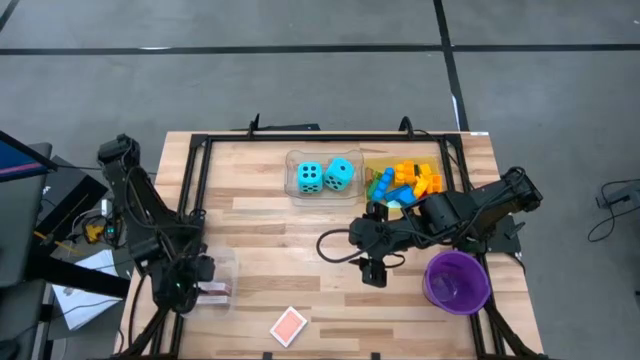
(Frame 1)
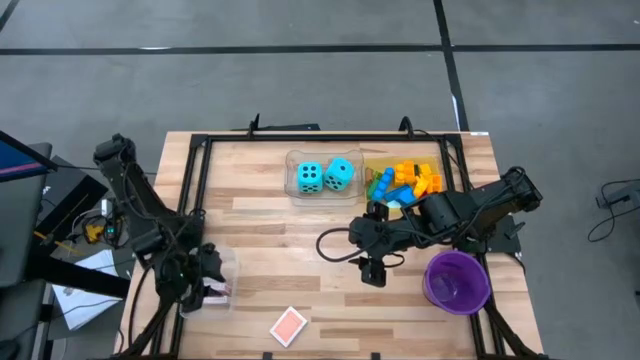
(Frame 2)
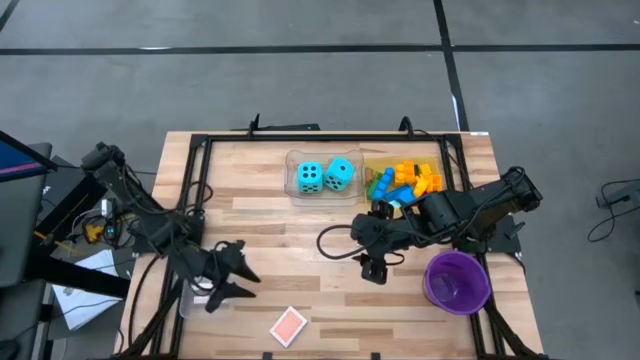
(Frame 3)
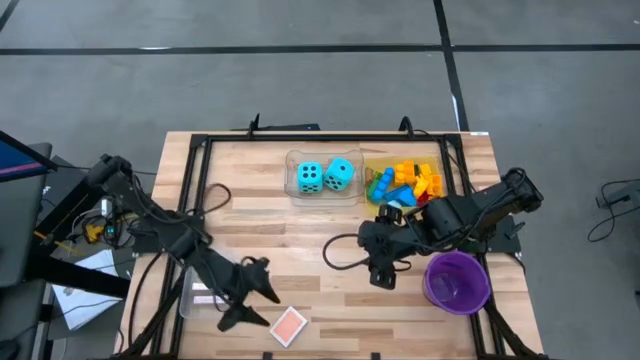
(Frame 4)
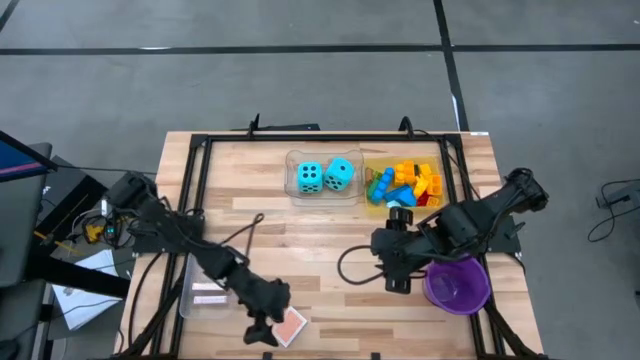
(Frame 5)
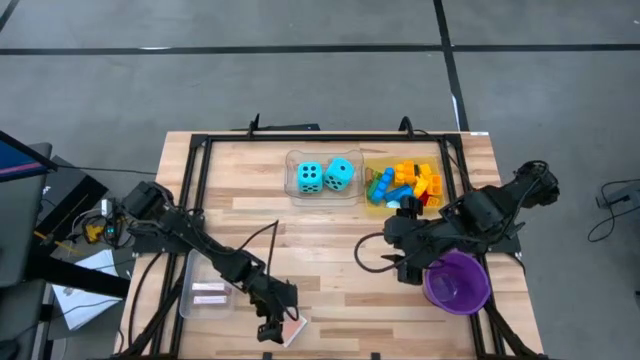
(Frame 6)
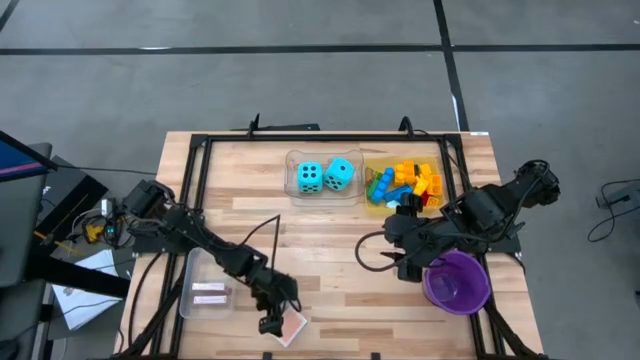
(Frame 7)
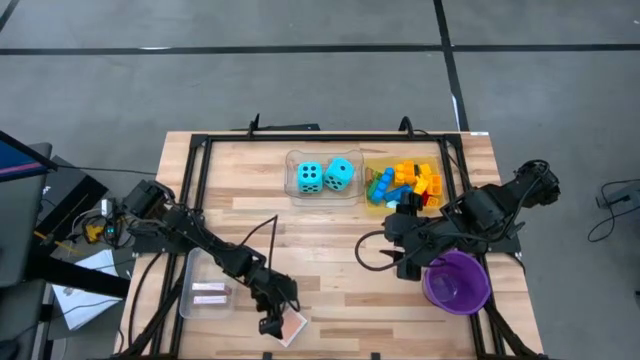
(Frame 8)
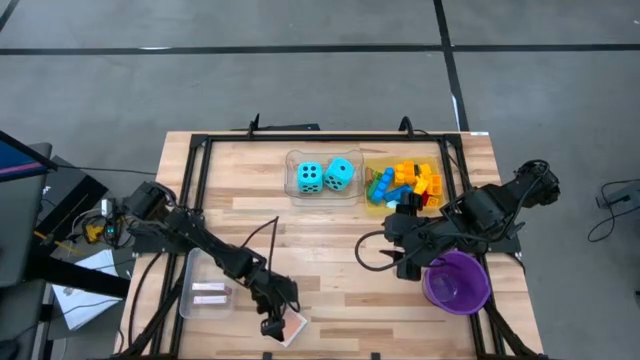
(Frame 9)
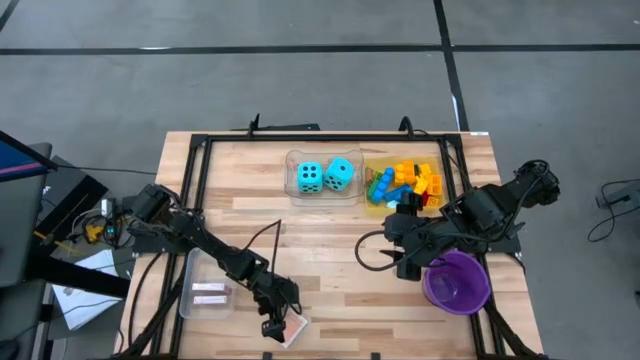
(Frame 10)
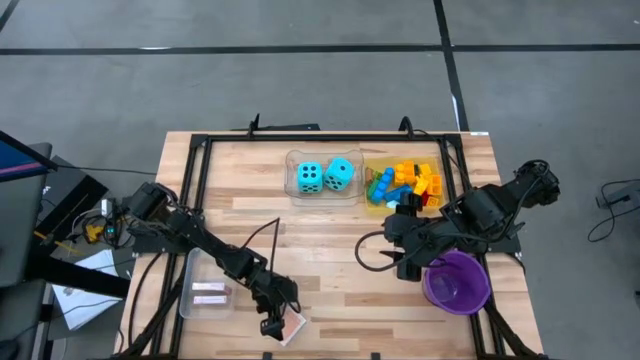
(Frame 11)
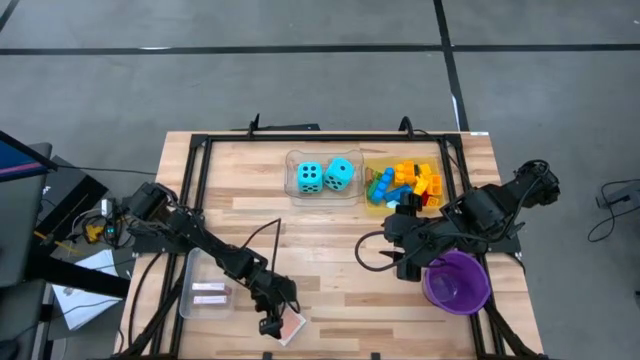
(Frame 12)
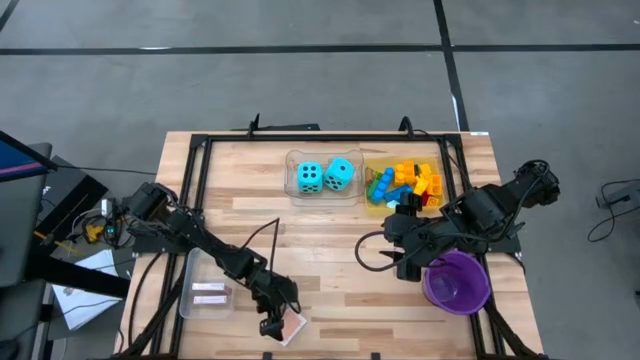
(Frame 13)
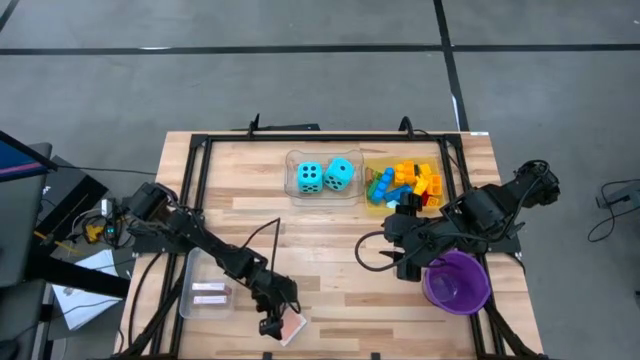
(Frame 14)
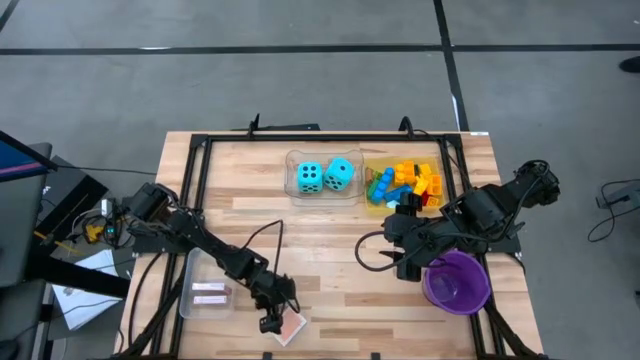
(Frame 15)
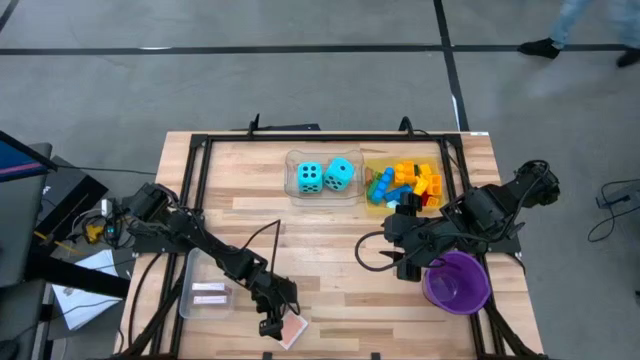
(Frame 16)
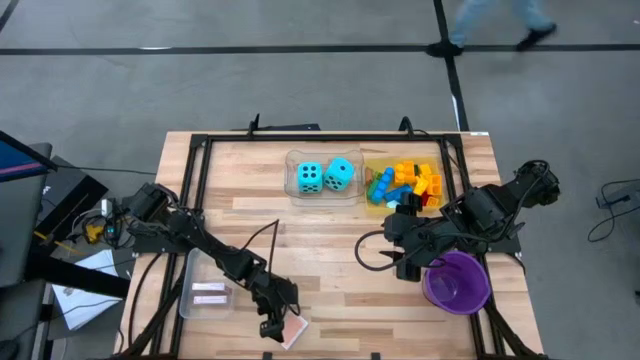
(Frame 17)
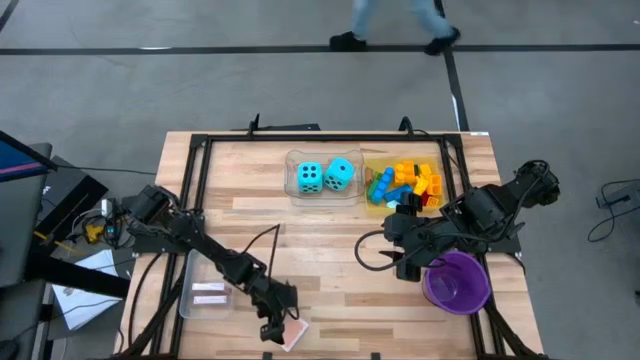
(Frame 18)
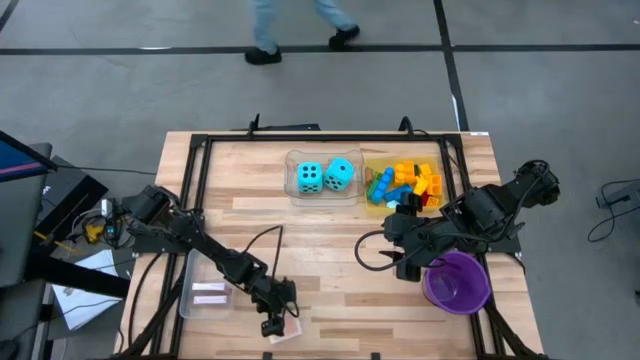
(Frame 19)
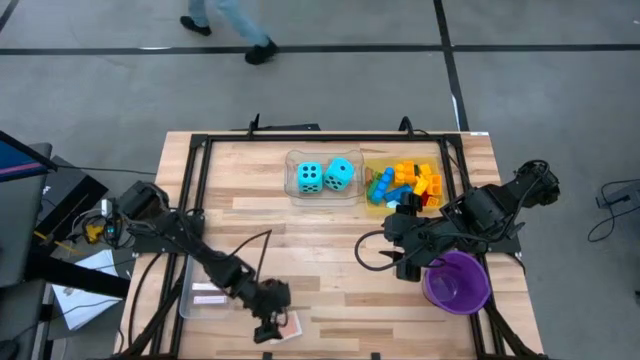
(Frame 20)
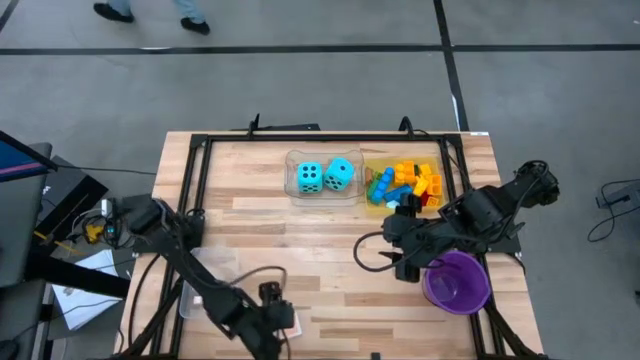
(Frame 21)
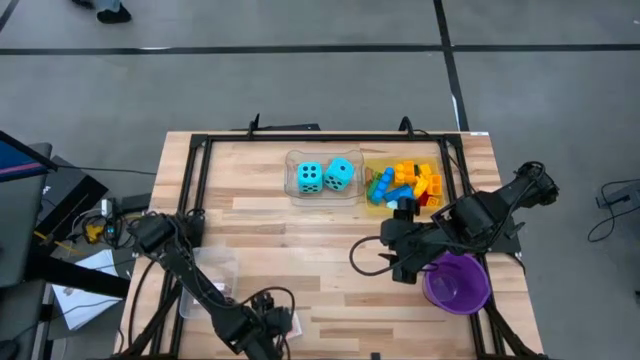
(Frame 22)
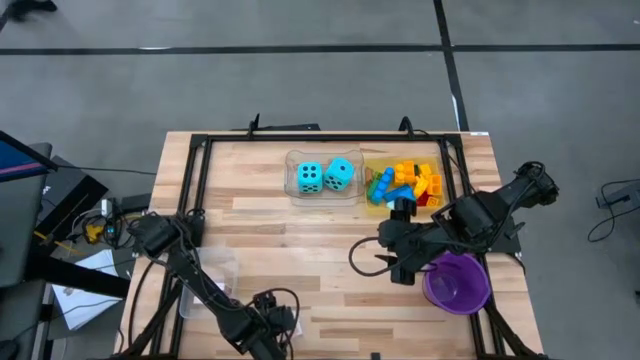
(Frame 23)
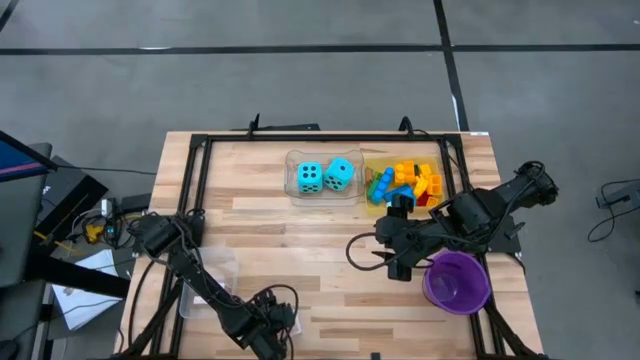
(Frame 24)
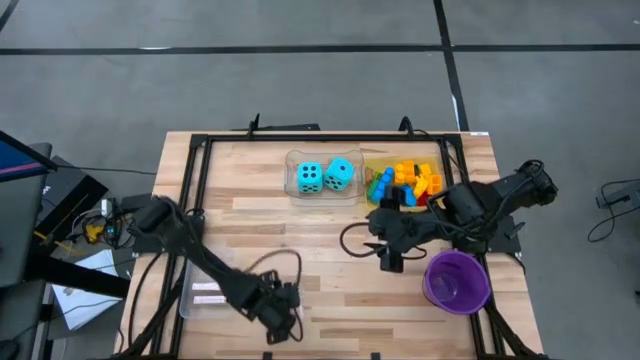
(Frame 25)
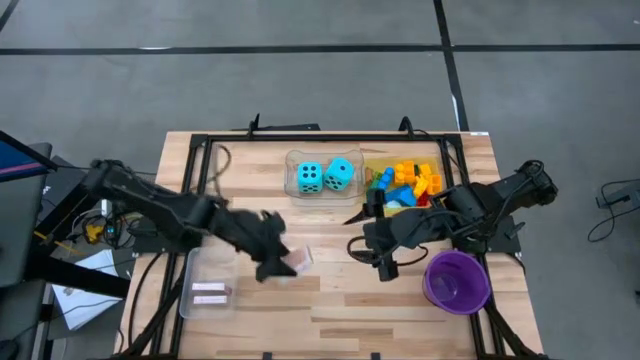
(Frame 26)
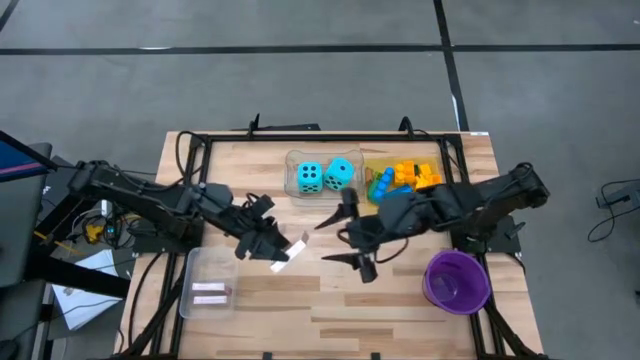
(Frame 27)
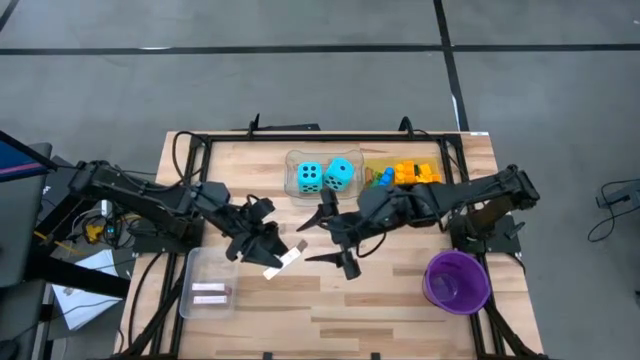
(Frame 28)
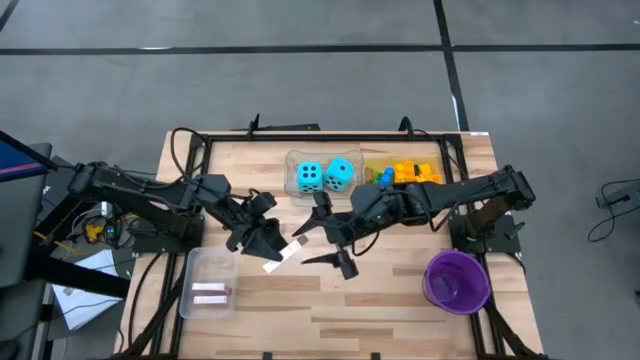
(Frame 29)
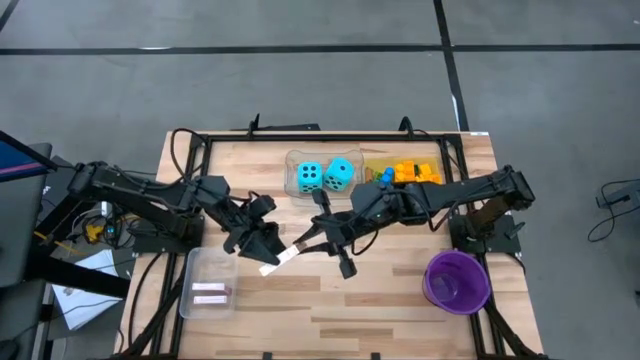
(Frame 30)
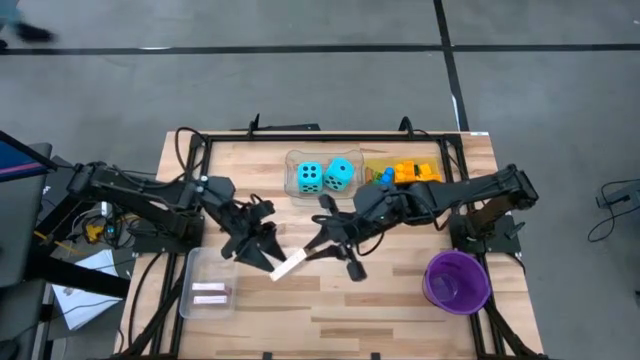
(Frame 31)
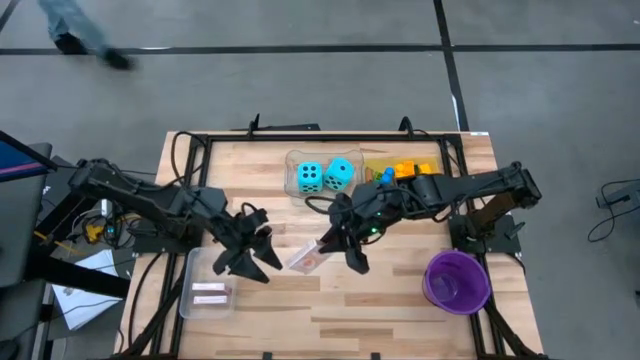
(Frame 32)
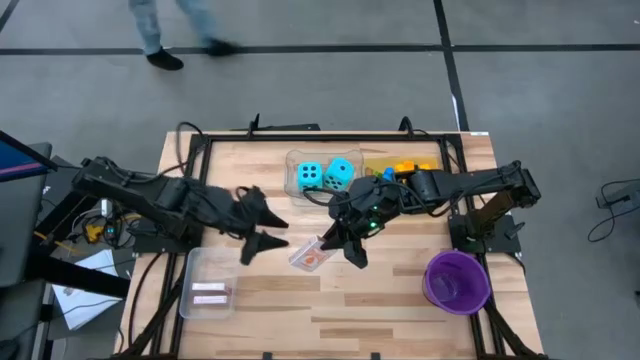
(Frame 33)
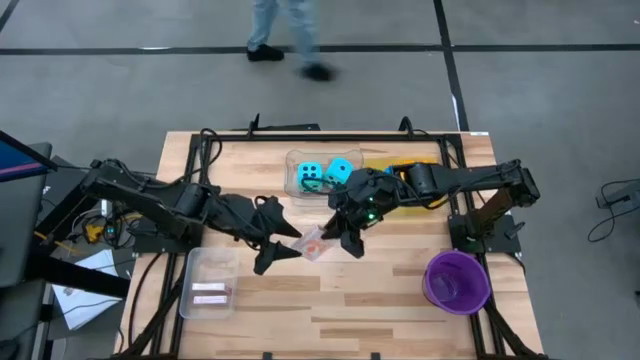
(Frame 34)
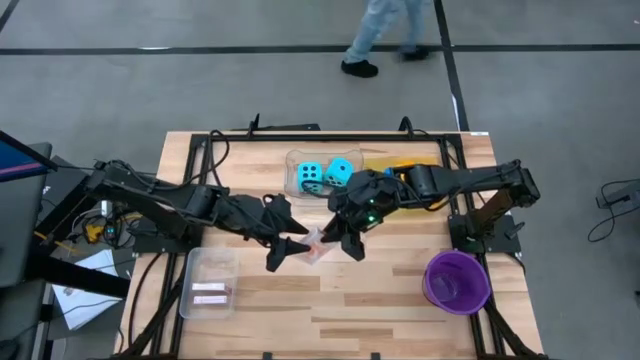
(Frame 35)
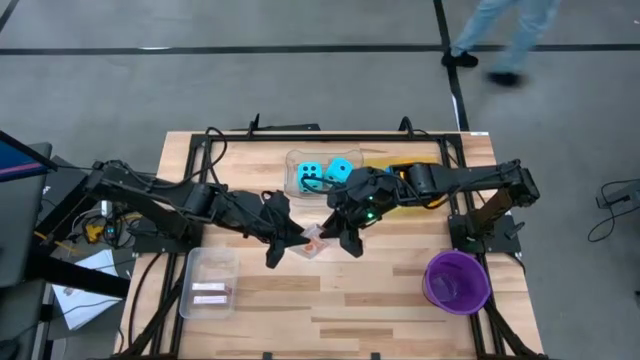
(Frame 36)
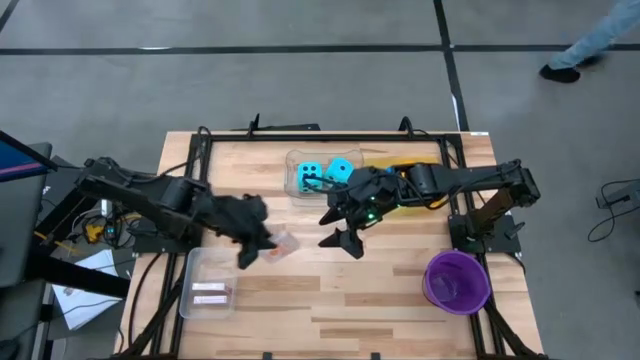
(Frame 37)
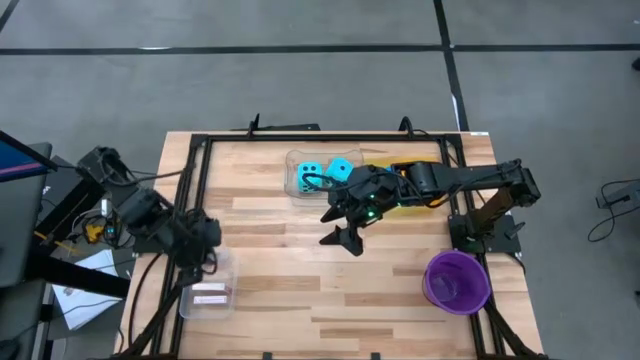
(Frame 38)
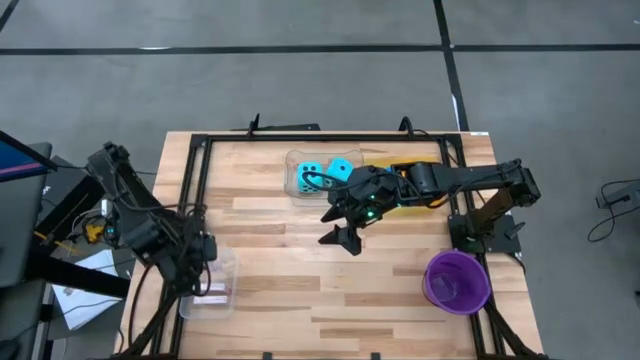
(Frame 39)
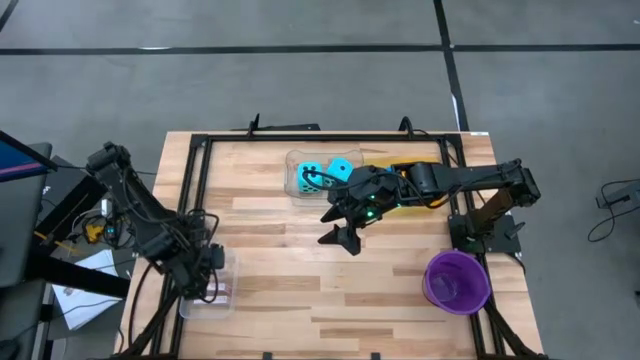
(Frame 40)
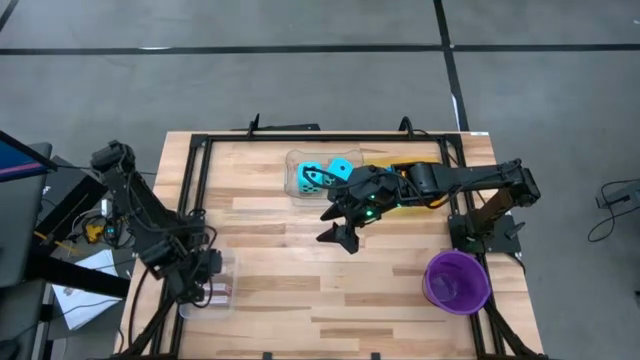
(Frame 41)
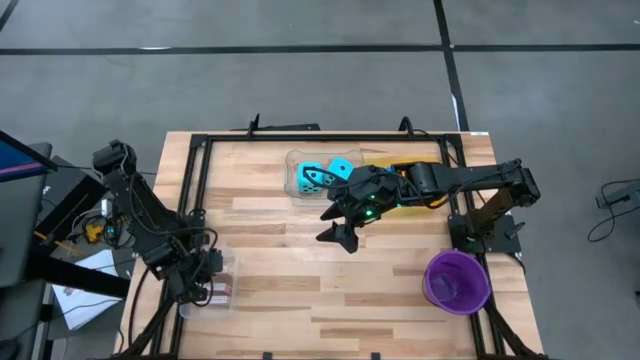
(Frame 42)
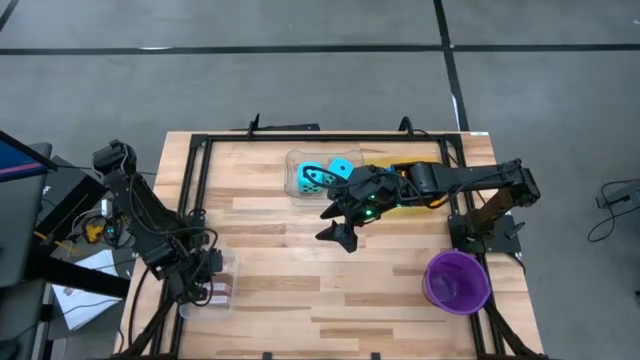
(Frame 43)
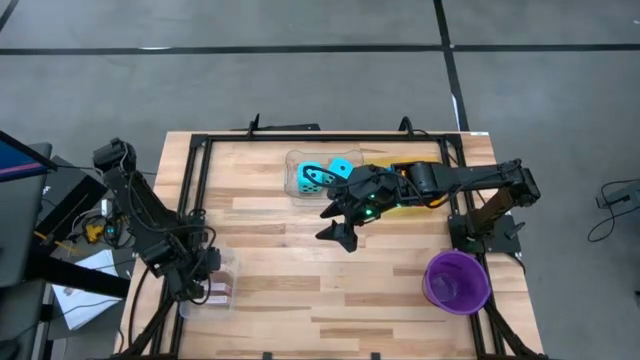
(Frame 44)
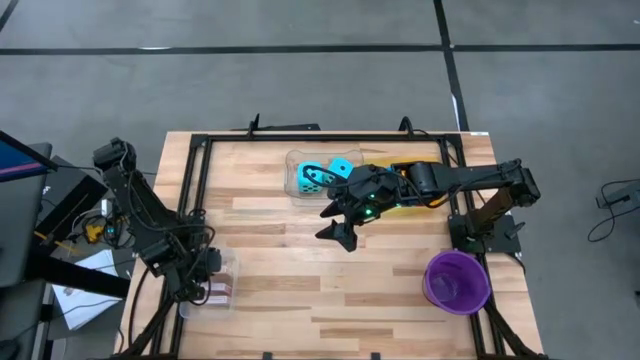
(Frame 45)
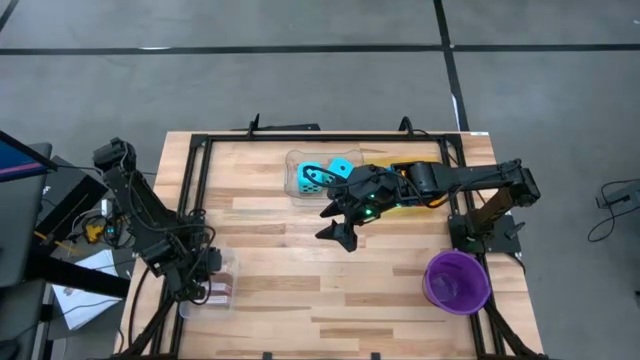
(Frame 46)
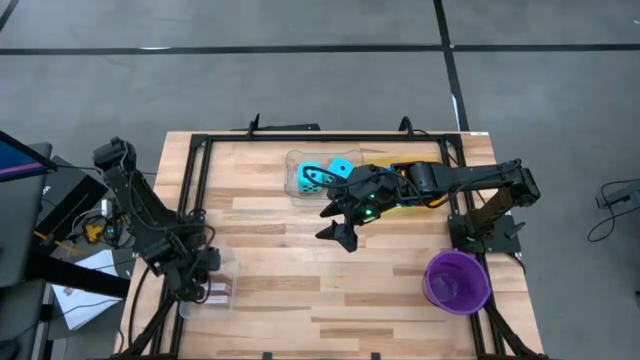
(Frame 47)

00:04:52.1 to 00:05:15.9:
Task: Pick & Place Toys
Put the orange deck of cards into the white bin
